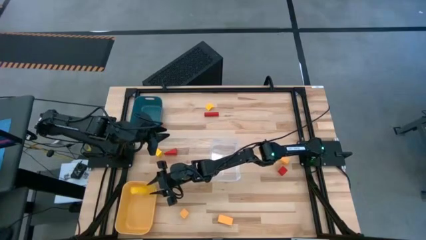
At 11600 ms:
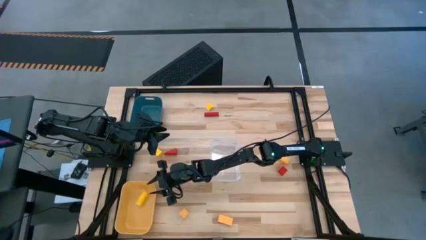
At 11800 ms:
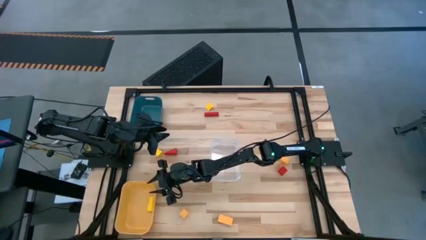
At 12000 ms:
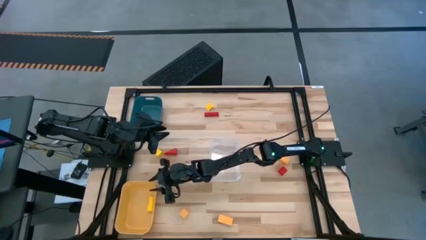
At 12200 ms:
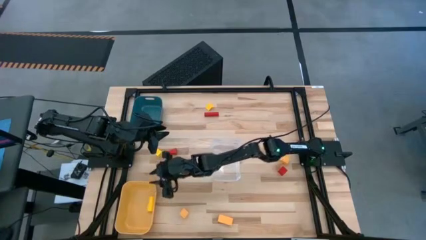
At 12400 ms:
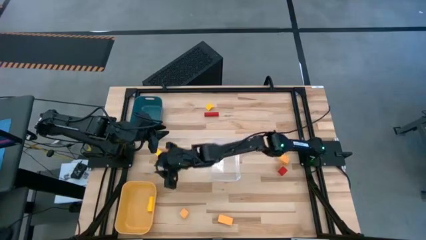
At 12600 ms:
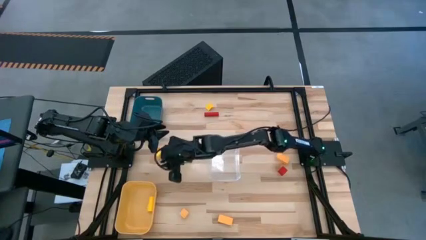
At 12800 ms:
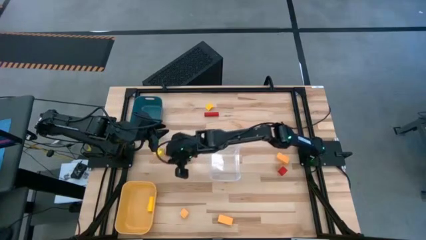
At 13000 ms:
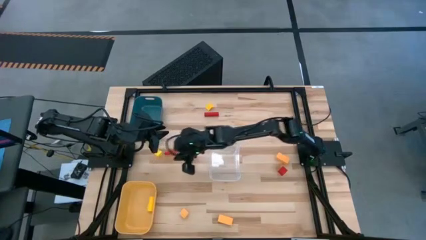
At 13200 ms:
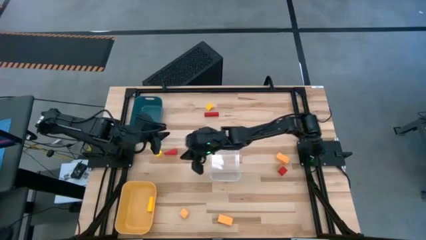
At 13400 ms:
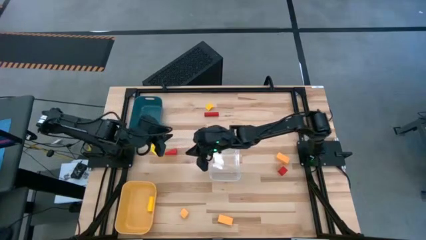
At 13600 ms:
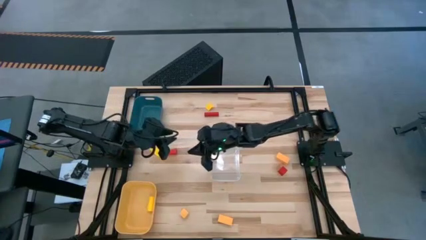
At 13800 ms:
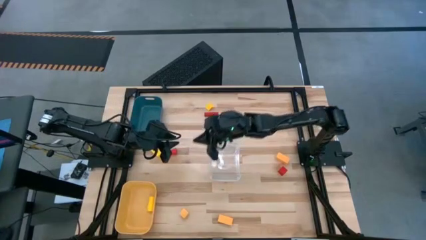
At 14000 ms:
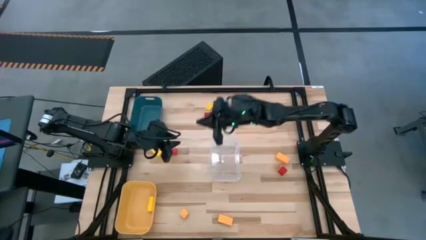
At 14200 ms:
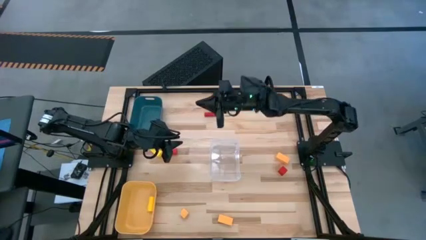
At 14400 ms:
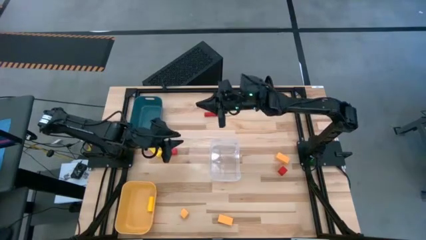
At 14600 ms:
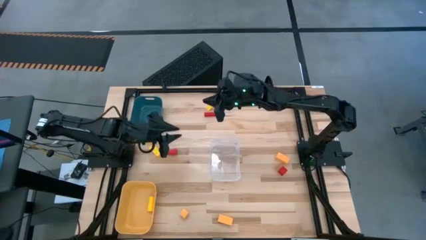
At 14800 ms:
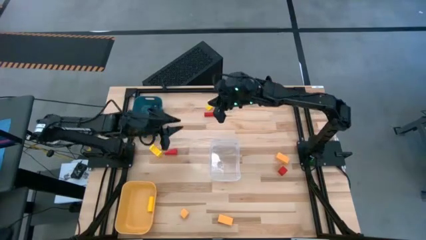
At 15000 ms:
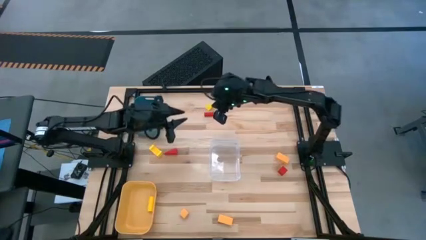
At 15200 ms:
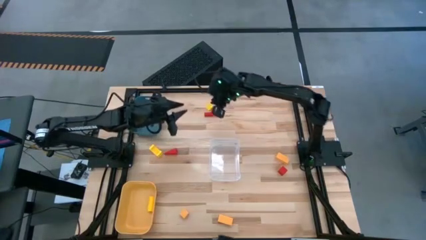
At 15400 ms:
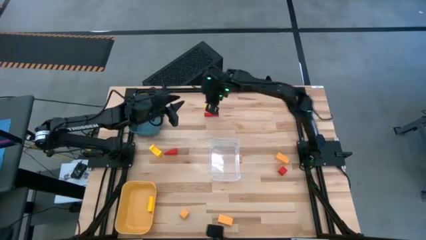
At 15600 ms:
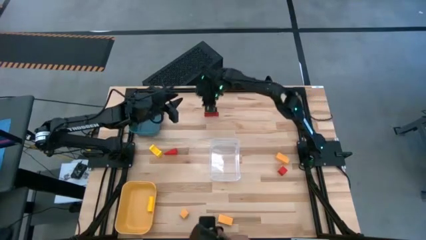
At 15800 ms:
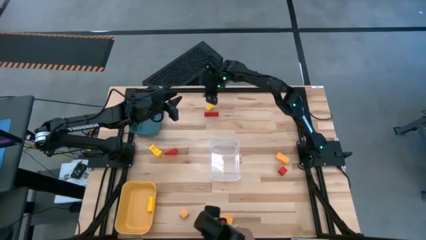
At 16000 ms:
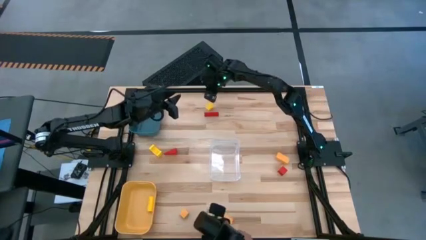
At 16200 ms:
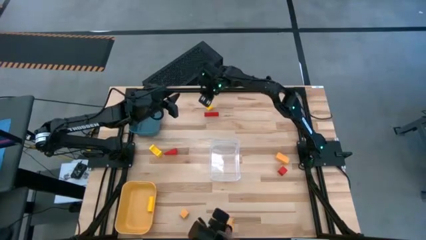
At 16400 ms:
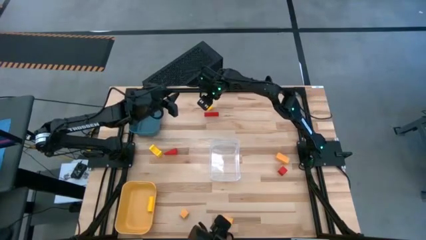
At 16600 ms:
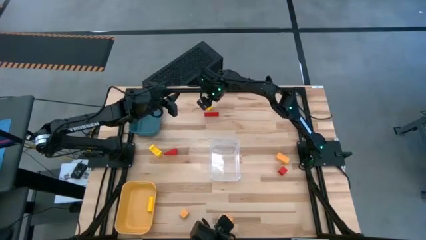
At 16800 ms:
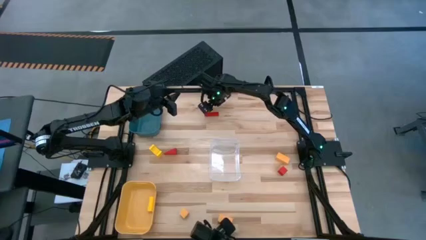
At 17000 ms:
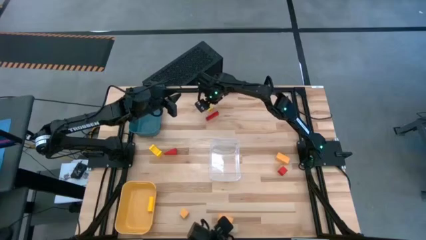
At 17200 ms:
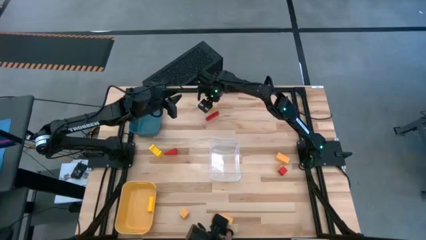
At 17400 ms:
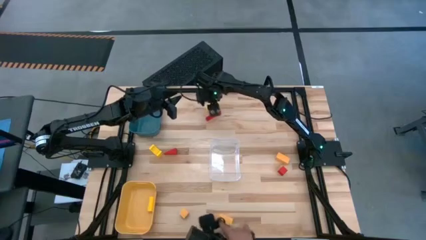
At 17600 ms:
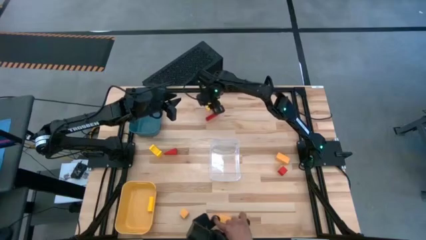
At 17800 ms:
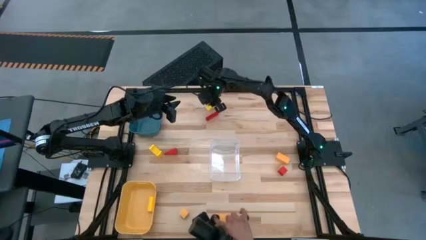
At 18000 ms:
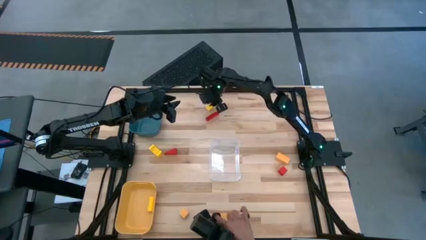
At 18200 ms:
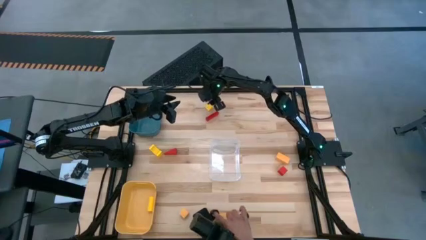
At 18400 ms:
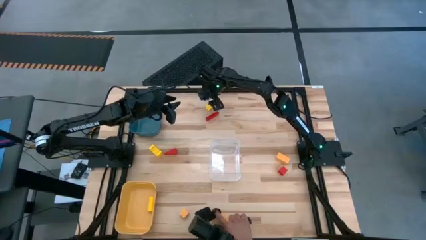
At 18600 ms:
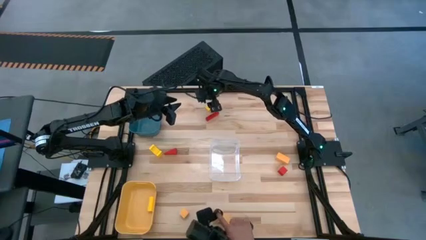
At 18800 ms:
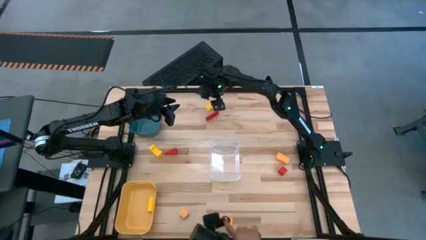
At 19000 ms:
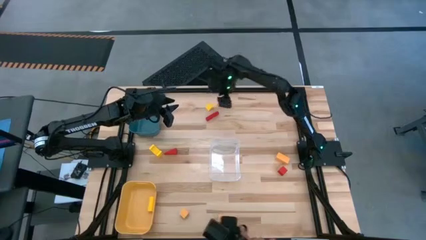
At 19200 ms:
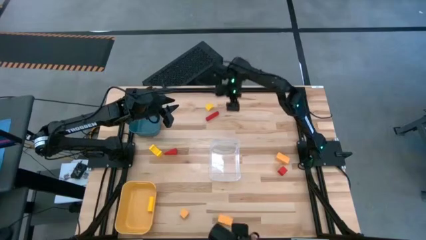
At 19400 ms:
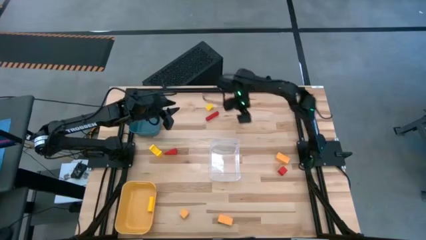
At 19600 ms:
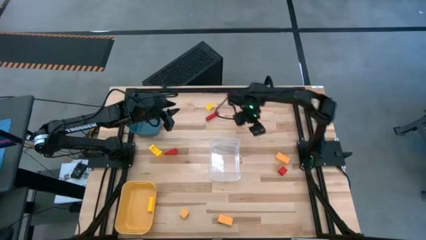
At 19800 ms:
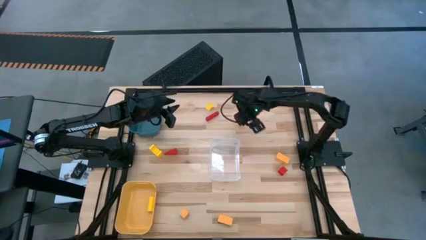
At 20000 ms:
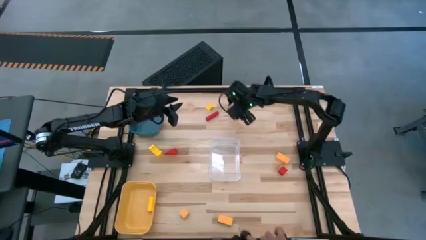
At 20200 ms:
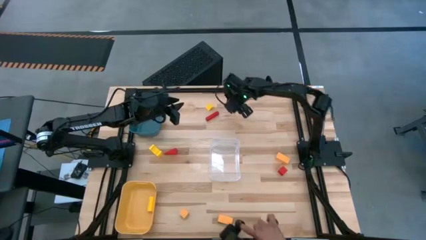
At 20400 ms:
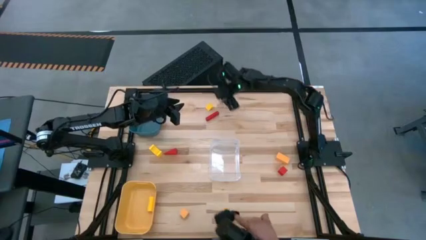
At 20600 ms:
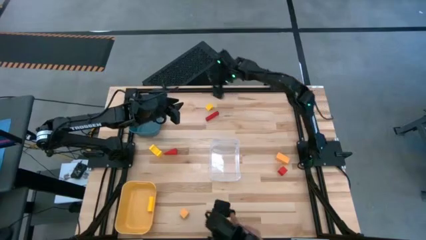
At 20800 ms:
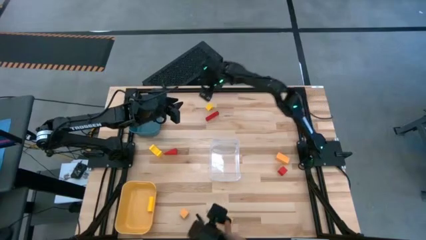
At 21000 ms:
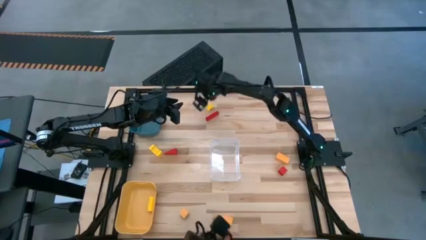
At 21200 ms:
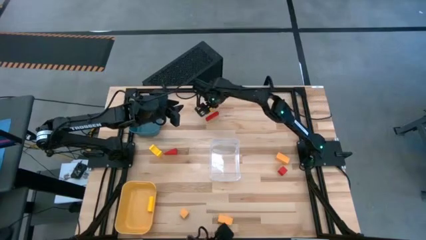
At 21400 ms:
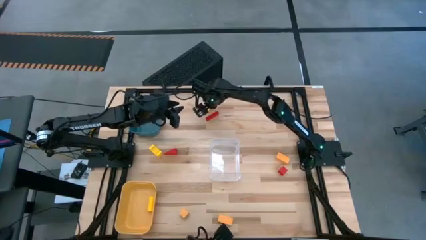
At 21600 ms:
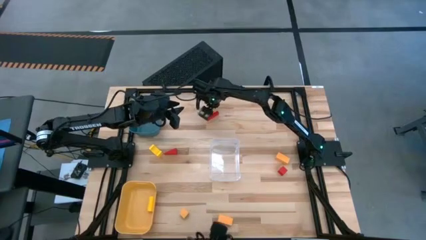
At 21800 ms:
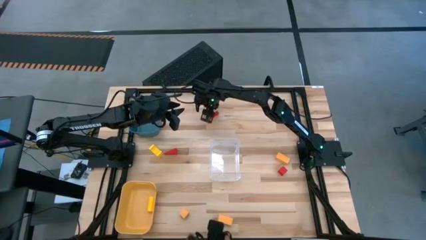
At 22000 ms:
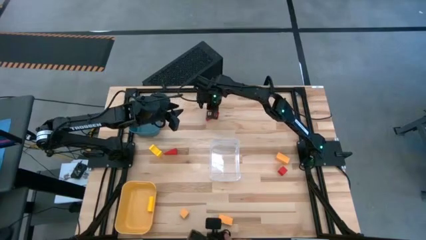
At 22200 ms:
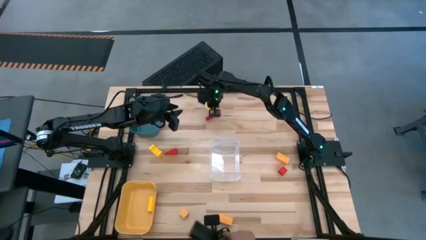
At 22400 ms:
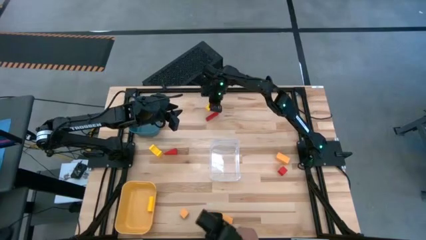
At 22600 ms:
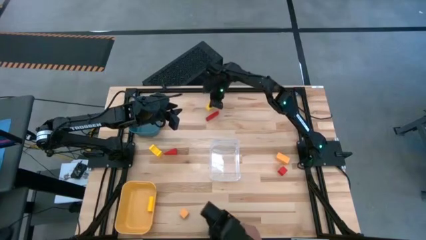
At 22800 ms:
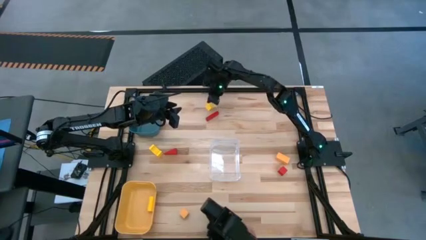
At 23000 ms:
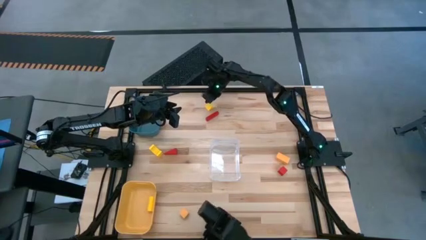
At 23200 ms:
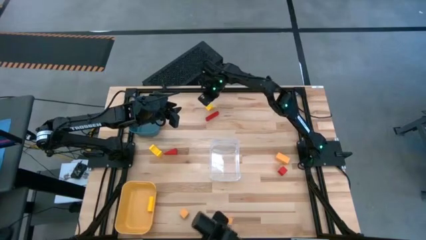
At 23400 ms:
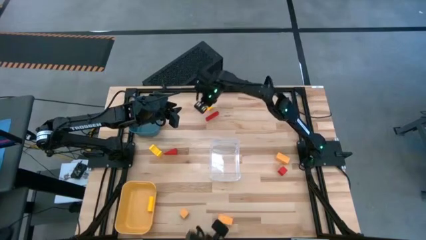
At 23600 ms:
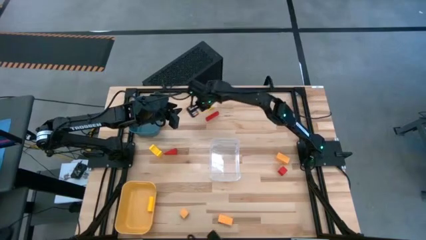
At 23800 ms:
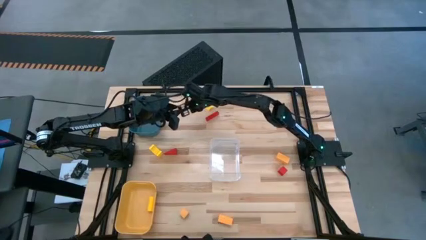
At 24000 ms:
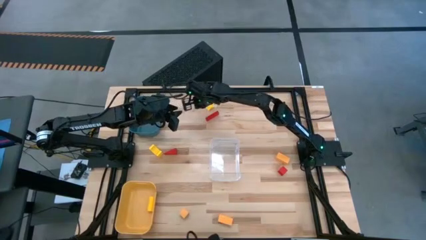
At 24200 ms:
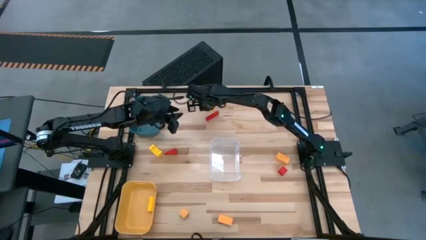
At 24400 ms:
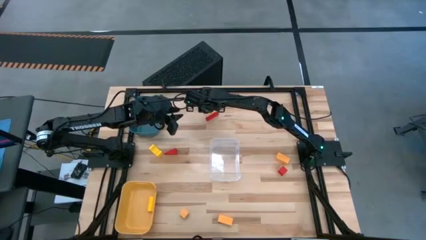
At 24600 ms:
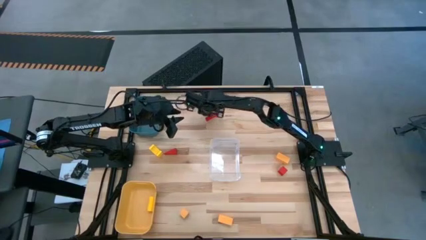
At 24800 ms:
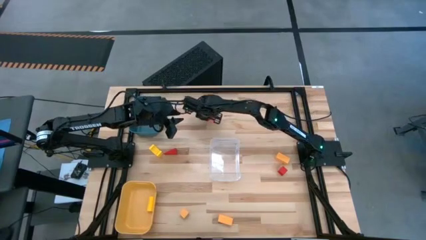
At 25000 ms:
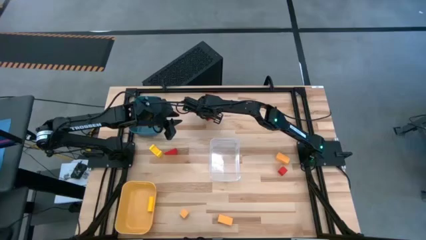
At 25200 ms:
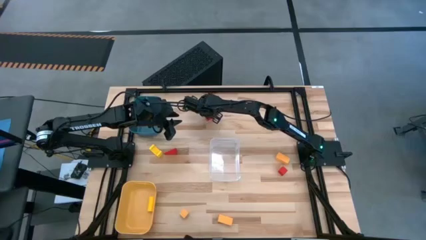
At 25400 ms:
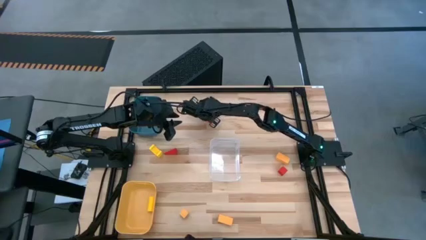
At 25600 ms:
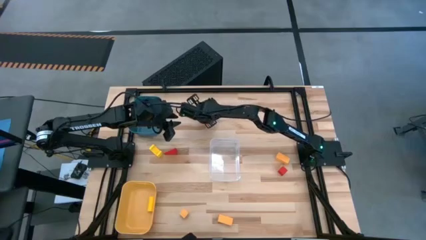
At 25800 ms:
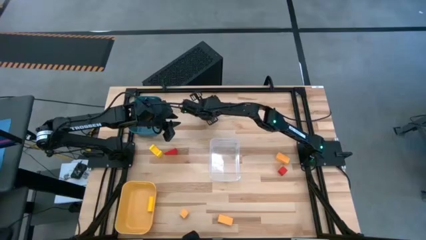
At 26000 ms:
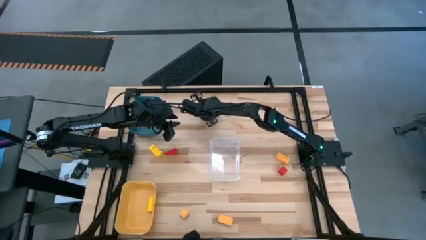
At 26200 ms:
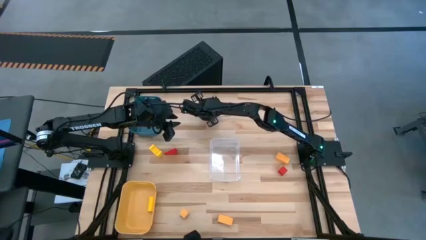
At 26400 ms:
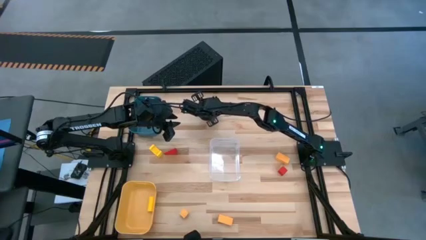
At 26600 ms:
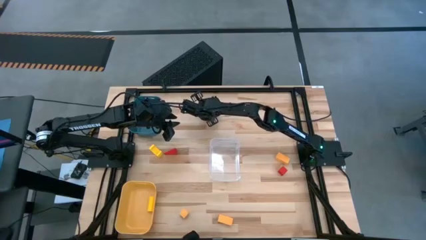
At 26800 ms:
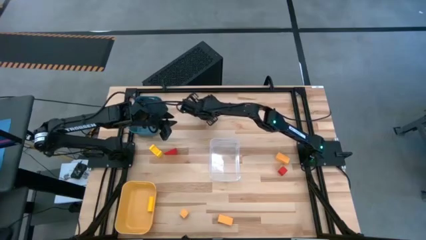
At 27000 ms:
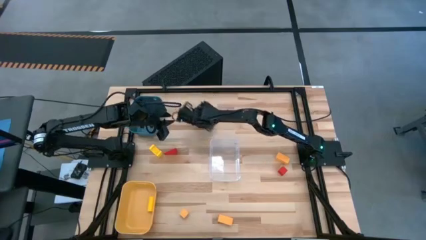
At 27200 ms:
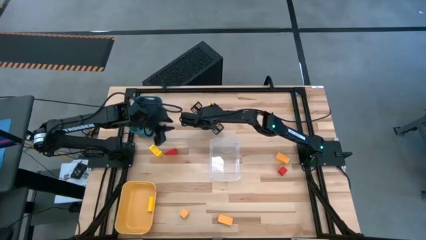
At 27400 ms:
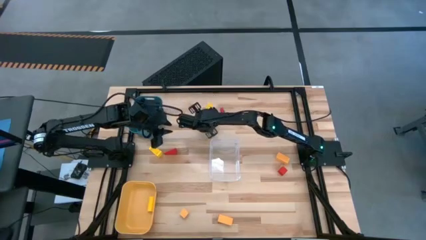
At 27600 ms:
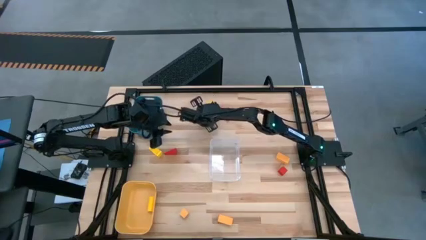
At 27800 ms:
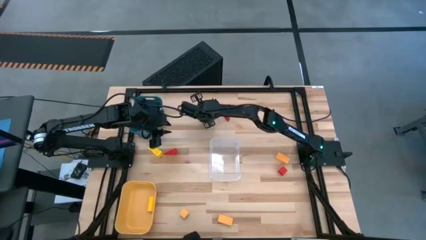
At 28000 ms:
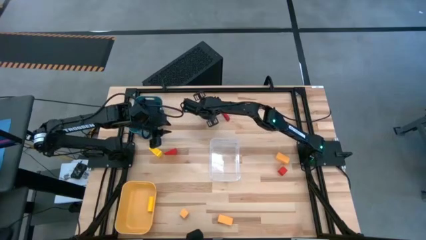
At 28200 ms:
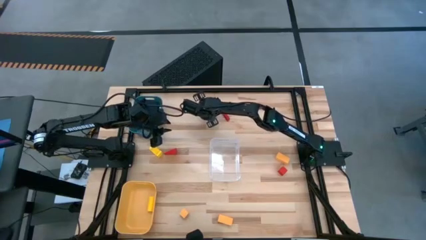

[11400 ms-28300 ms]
Task: Sort & place blocks by color
Put the top yellow block into the yellow bin
